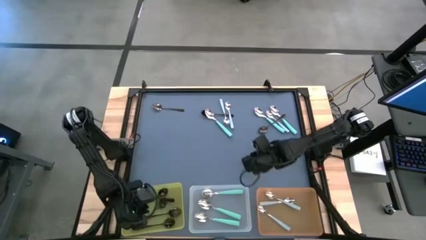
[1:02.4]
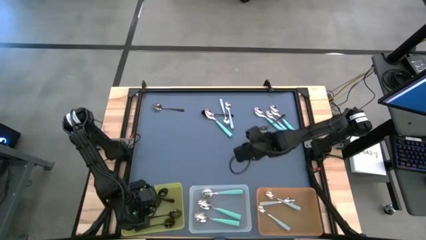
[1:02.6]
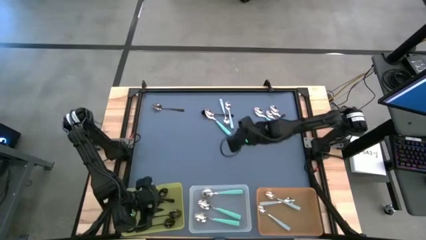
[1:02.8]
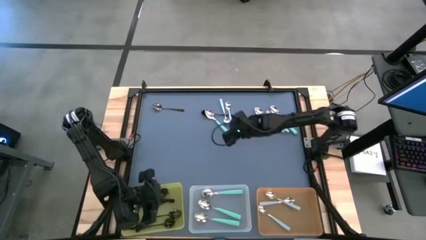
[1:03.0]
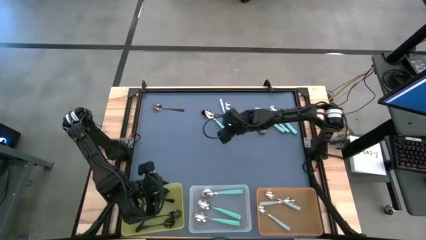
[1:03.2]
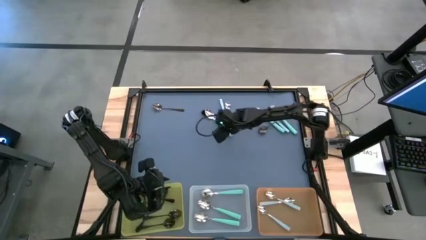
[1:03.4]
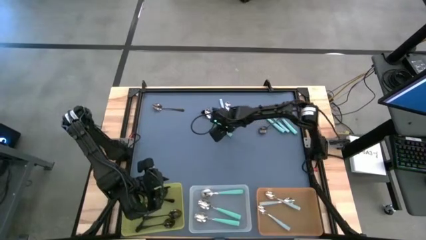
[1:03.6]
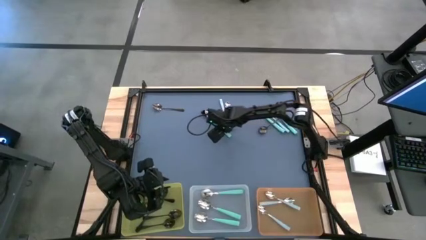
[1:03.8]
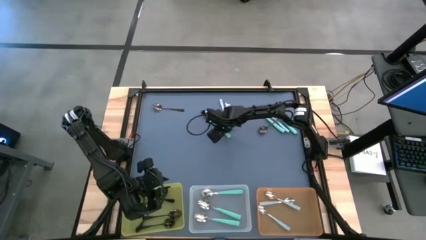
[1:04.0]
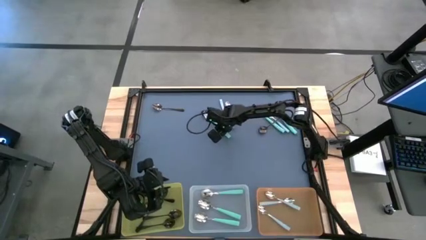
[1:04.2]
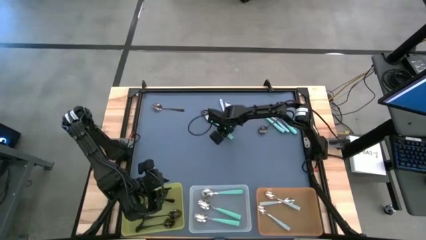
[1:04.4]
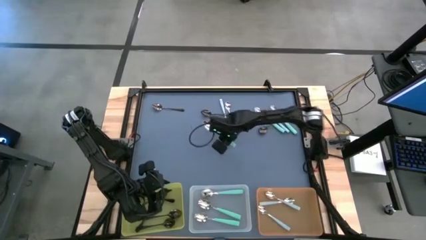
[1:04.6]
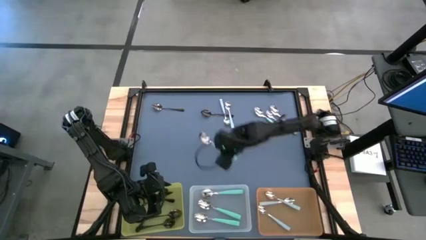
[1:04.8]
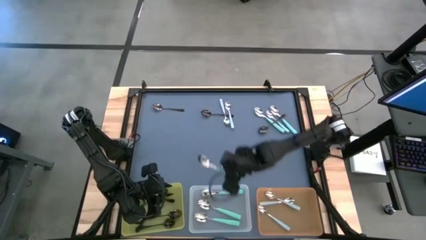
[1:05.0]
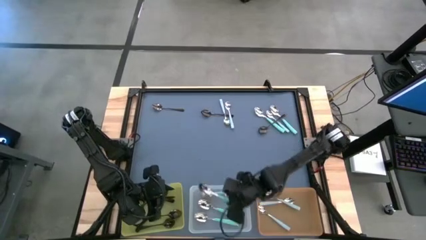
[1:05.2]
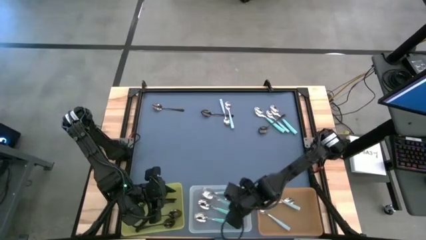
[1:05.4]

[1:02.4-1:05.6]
Task: Sort silverware by color (type)
Put the green spoon into the transparent bin

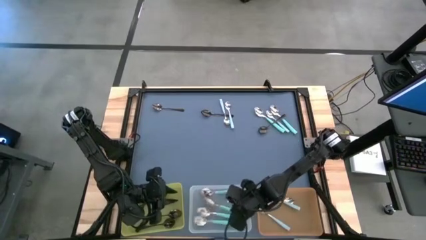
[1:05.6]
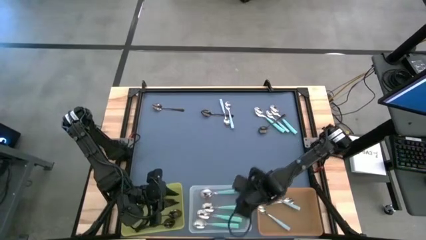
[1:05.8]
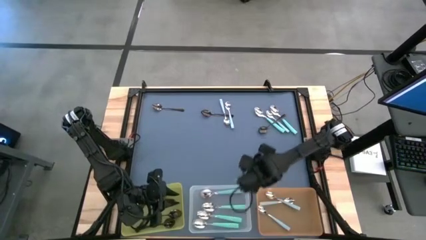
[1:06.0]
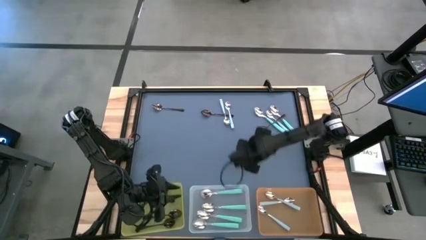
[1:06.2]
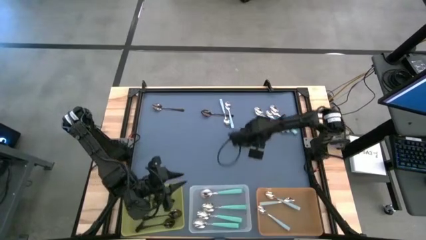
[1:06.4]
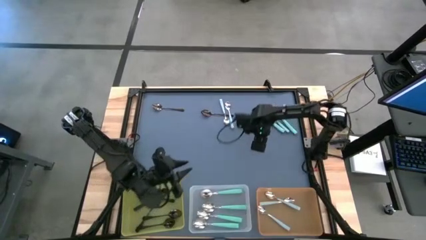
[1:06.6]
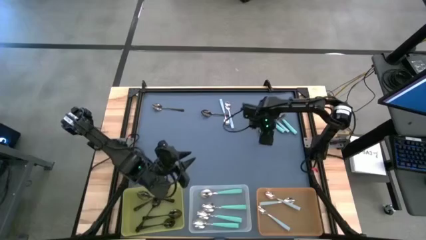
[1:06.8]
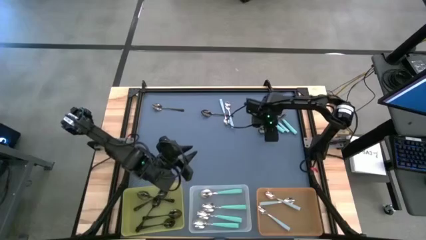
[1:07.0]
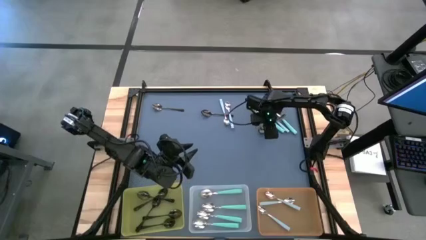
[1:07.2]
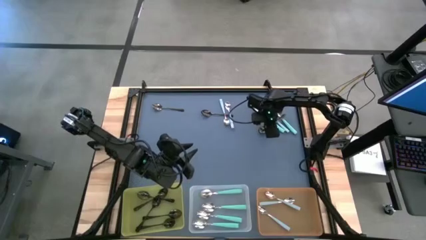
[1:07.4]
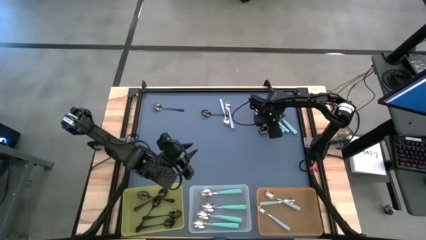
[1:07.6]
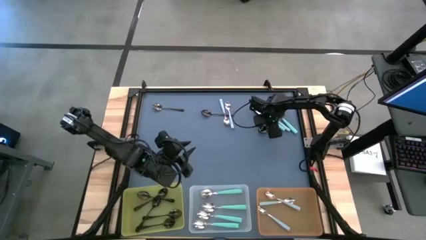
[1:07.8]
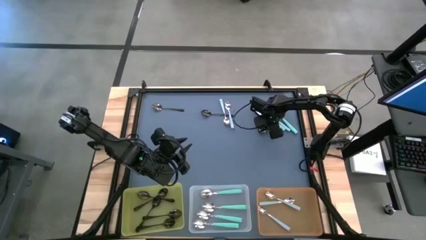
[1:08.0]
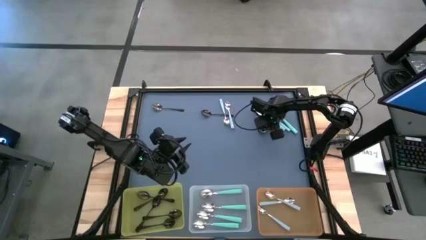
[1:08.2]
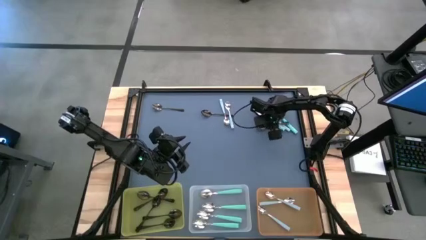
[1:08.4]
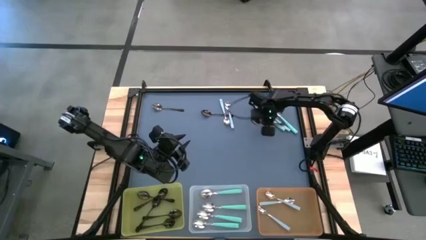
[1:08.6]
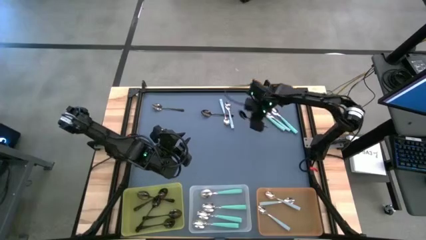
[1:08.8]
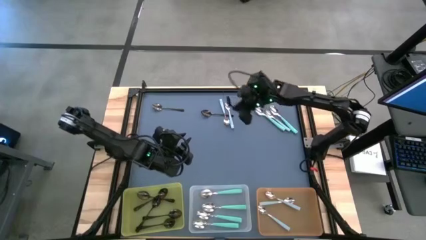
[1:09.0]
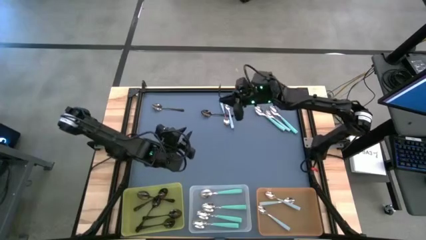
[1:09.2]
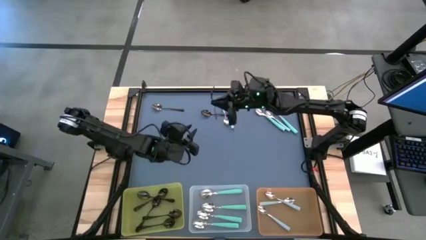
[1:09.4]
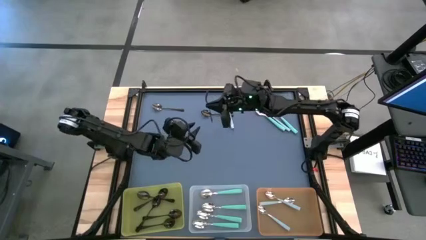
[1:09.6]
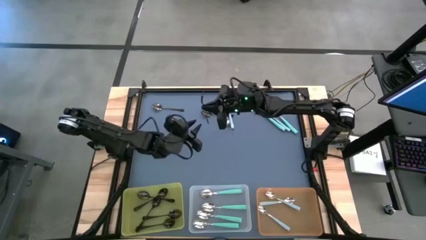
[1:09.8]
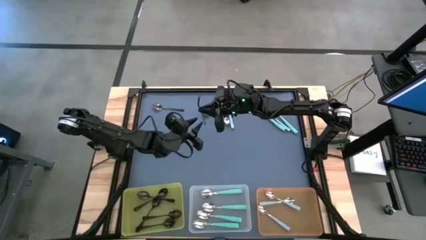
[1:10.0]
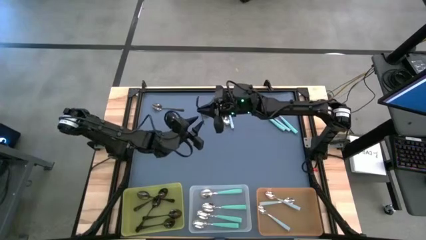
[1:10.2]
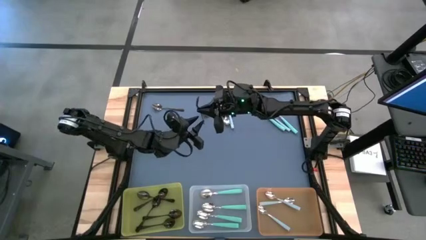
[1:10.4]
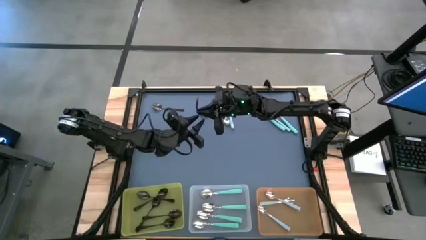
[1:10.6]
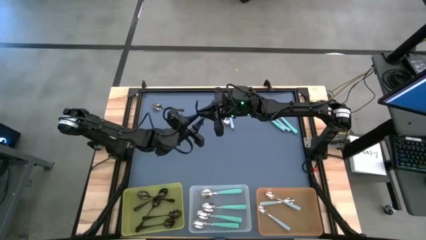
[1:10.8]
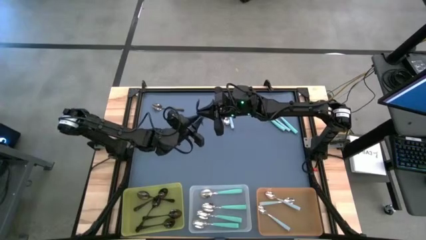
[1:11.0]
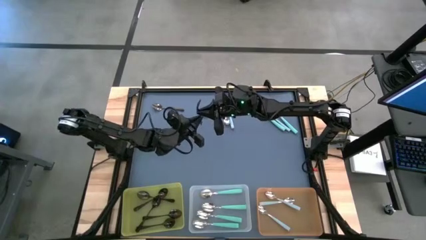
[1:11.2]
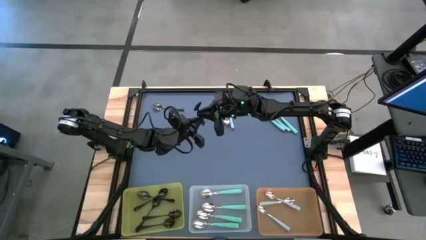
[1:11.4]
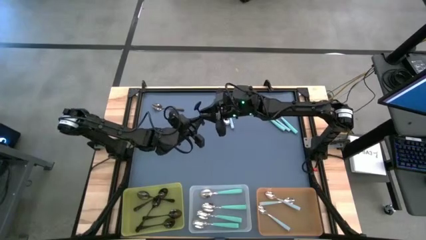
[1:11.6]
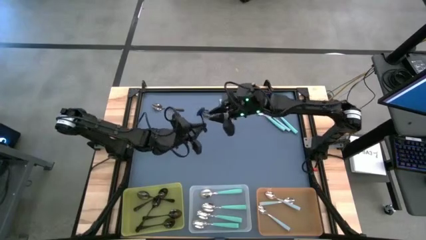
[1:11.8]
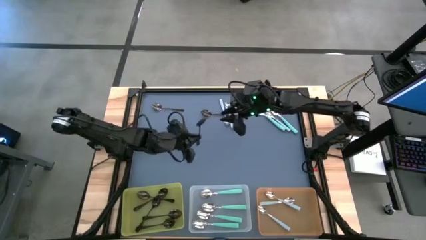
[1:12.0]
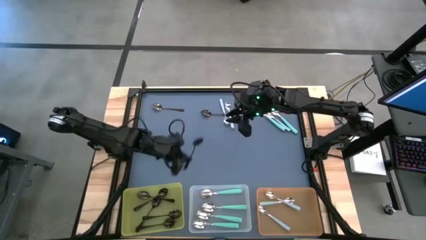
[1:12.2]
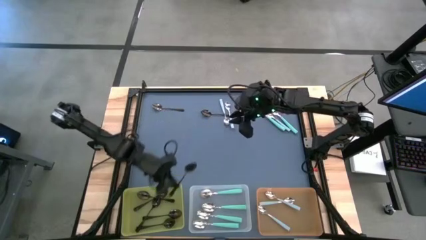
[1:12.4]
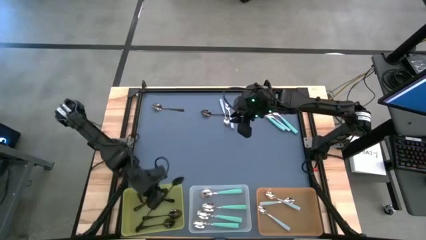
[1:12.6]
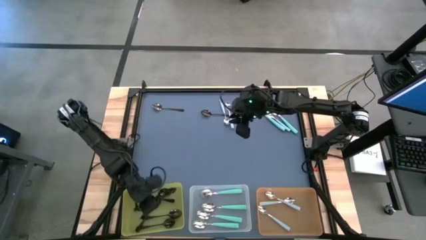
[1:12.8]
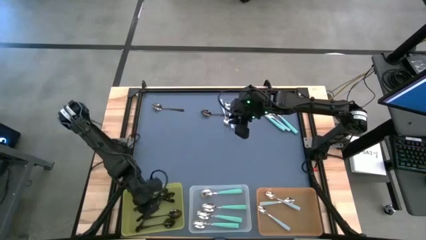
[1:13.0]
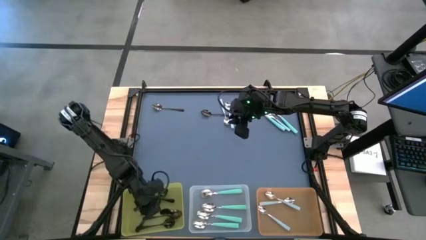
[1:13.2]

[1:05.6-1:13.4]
Put the black spoon into the yellow bin

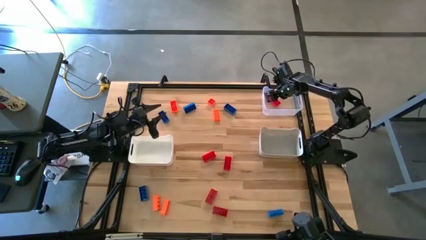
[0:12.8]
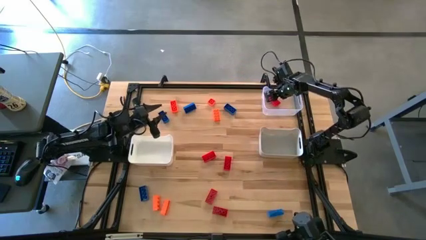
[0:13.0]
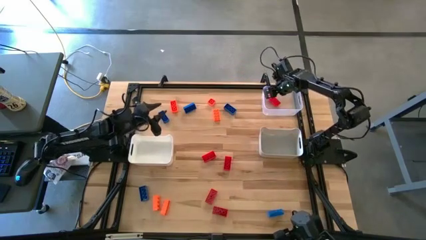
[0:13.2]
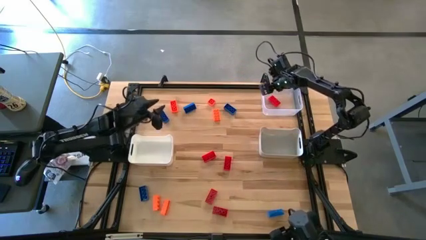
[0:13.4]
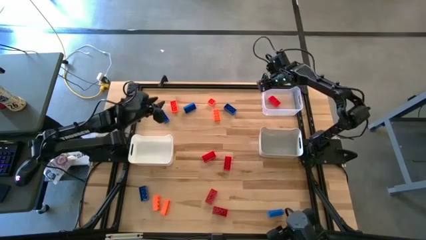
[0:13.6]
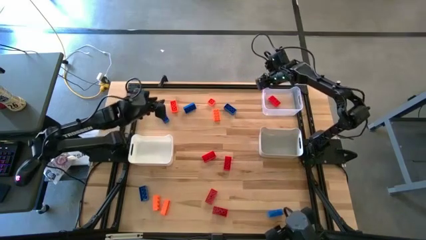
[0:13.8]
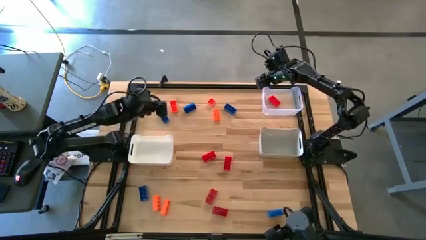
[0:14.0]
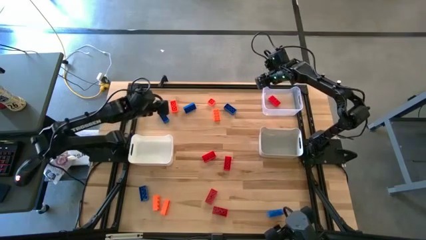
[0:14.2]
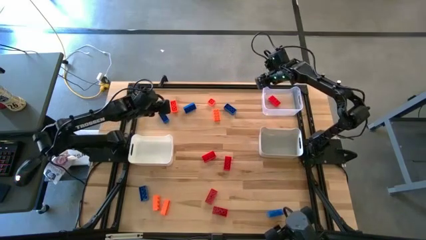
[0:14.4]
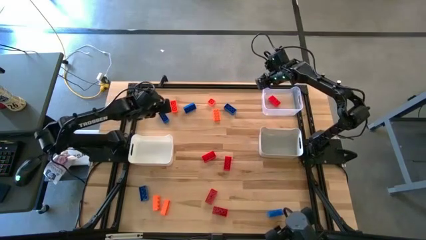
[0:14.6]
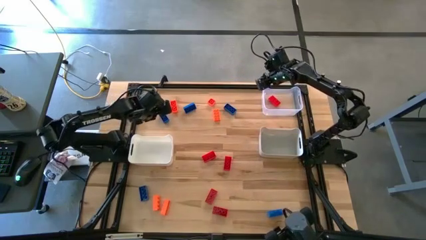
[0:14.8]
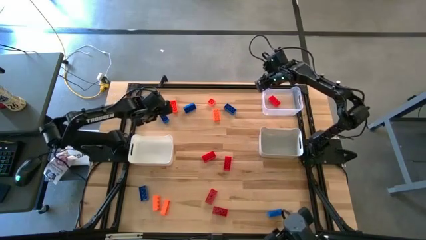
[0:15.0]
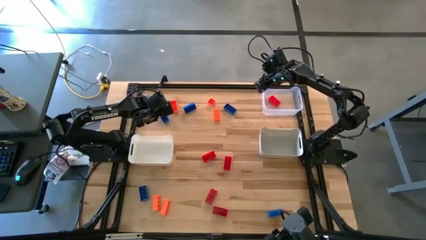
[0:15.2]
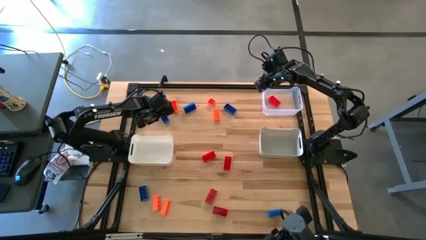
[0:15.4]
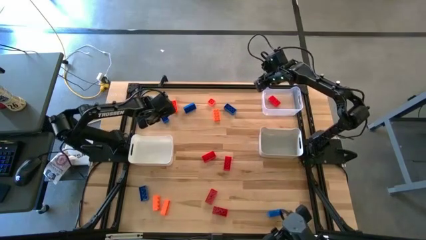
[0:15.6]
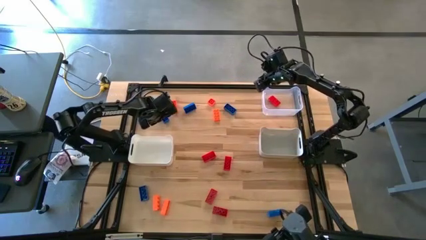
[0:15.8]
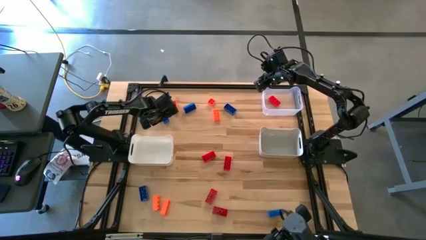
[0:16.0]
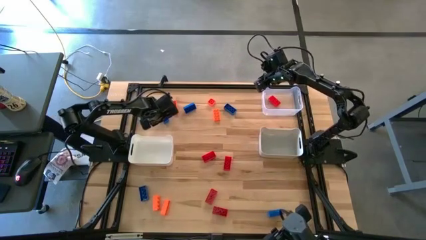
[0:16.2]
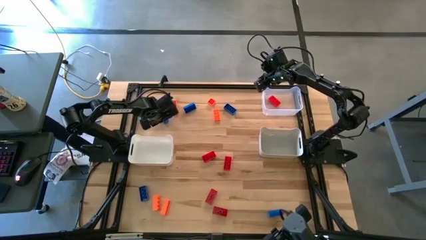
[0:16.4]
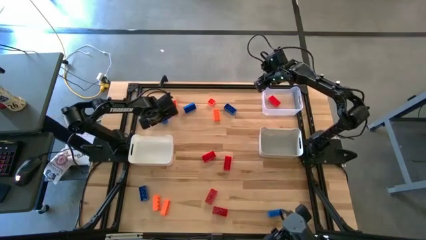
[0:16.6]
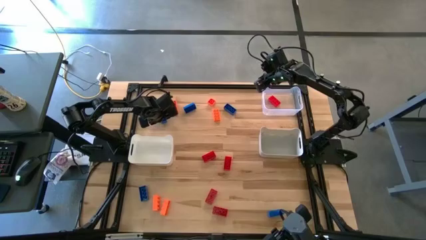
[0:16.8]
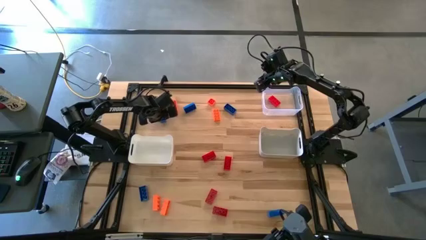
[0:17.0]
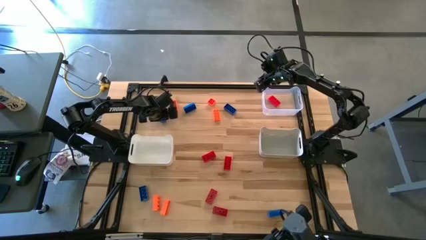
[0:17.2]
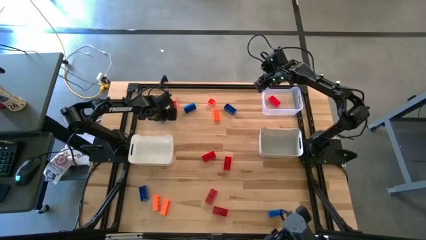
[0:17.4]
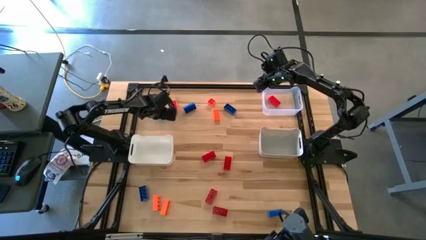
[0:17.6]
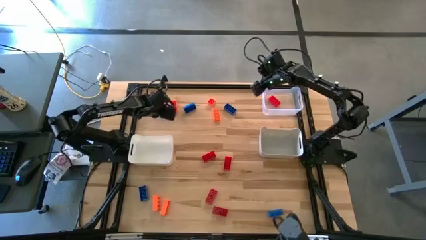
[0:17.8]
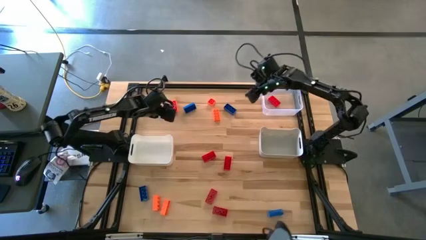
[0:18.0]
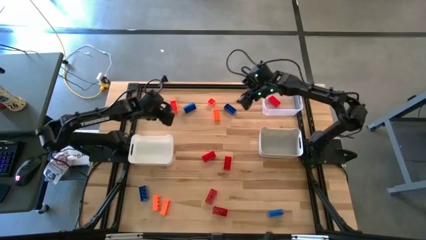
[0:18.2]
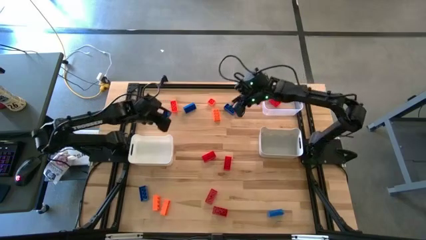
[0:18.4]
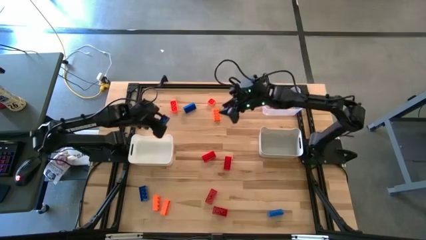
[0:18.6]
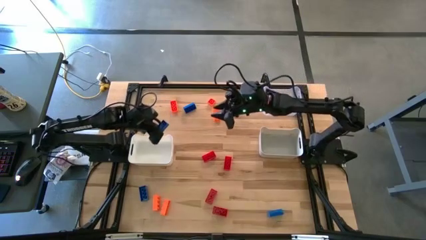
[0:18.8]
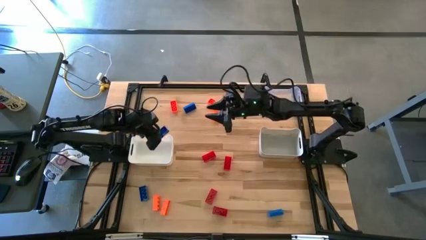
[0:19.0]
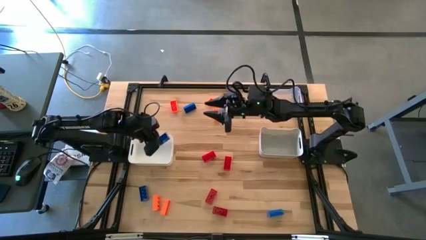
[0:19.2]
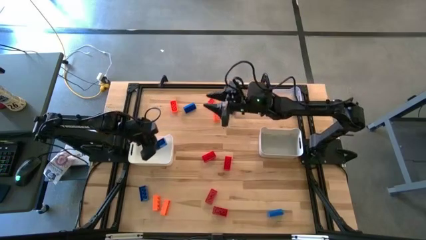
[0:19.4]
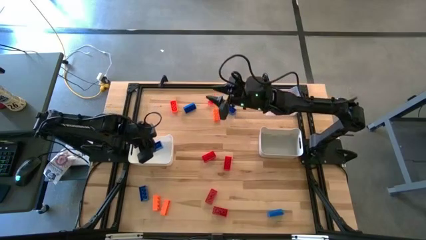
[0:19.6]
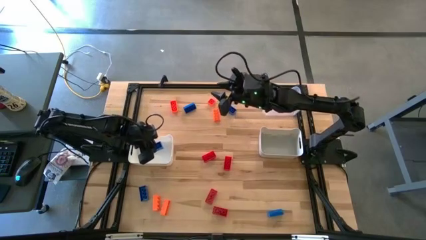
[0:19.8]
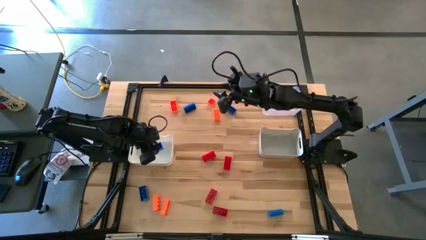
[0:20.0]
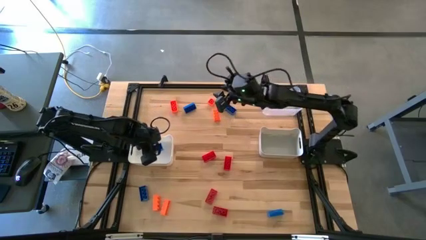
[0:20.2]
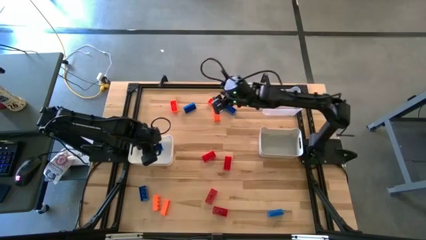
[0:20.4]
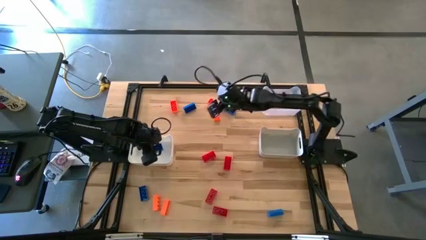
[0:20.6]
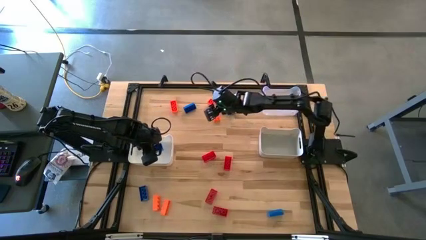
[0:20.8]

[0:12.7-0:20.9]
Task: Sort & place blocks by color
Put the blue game piece into the white bin
